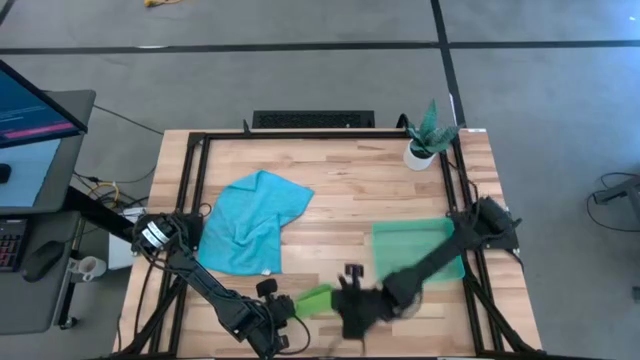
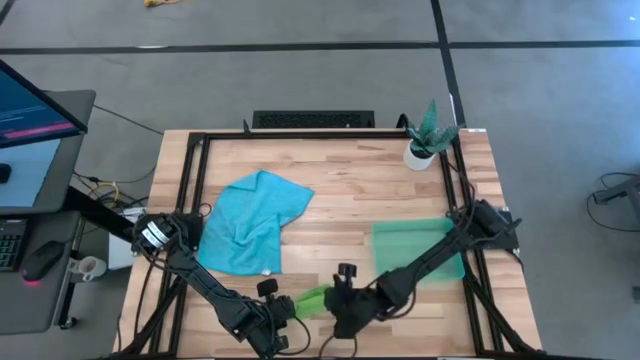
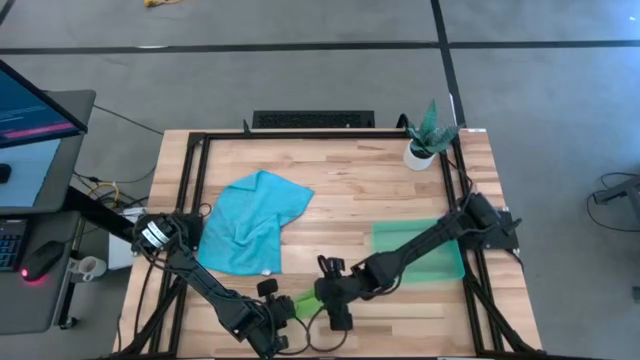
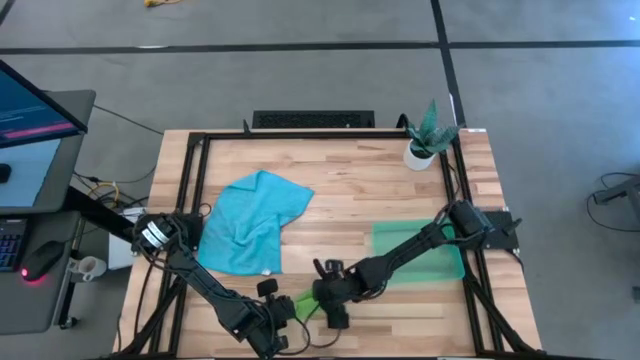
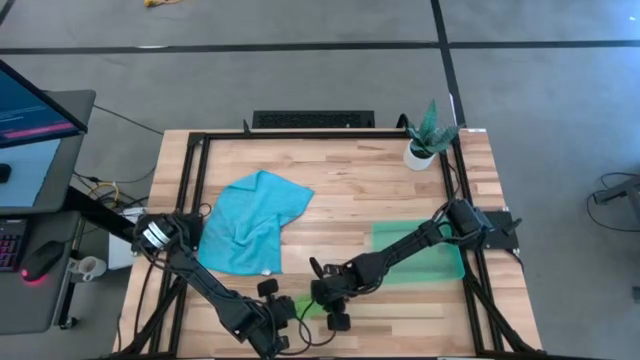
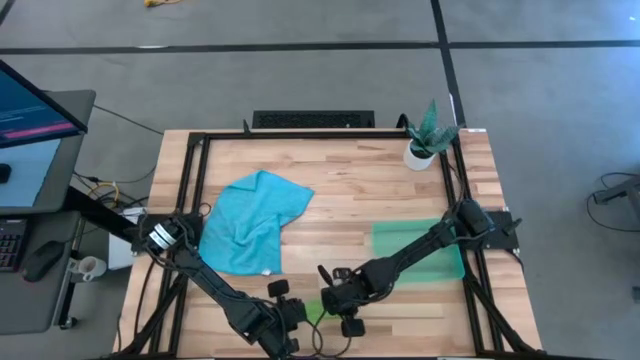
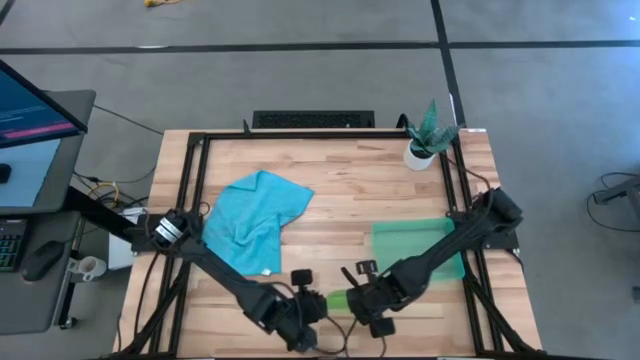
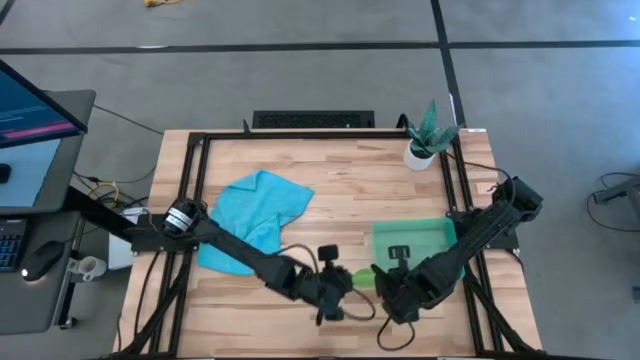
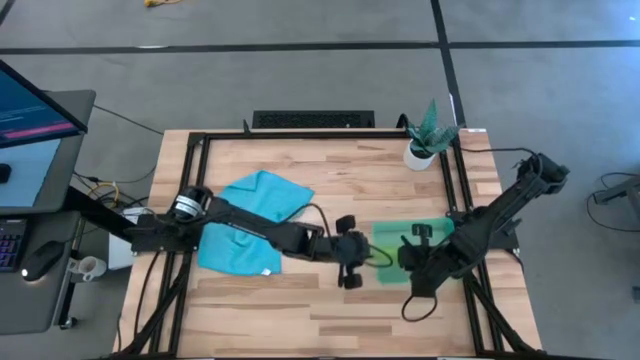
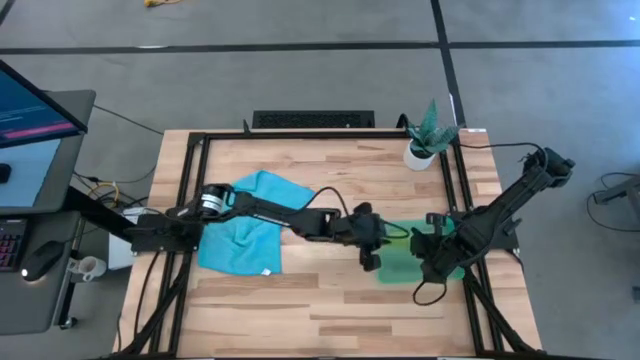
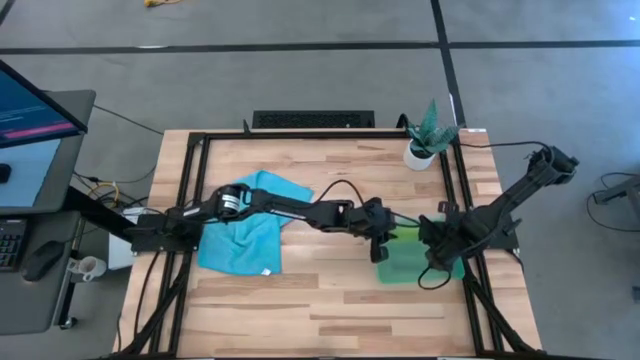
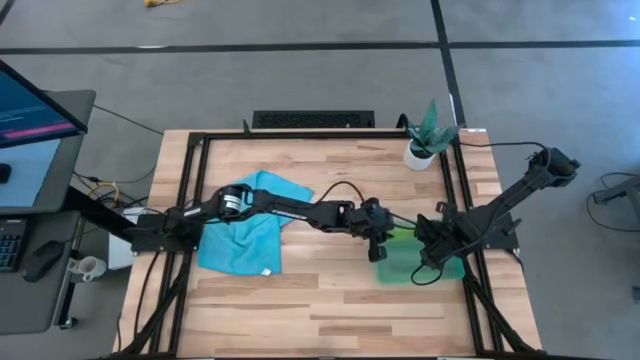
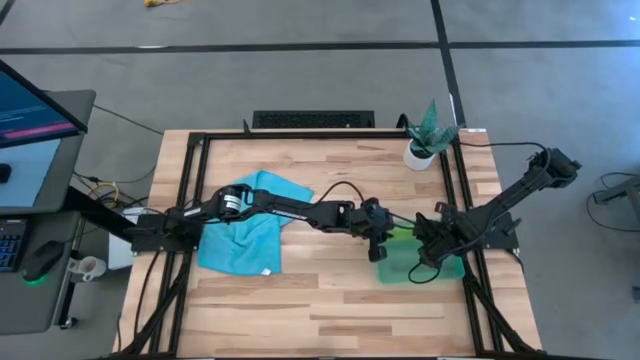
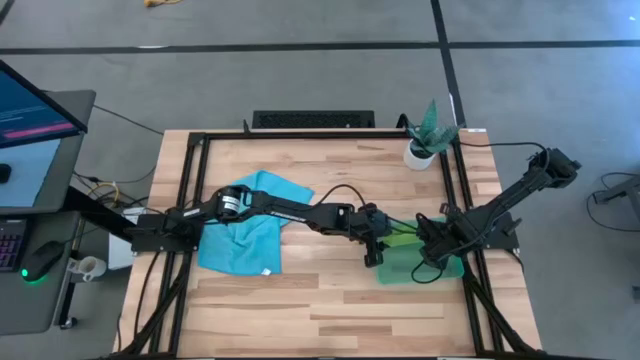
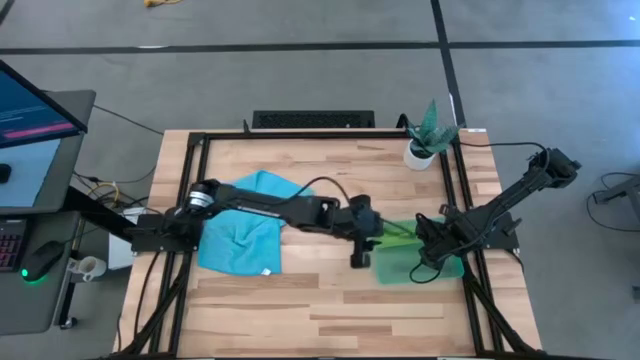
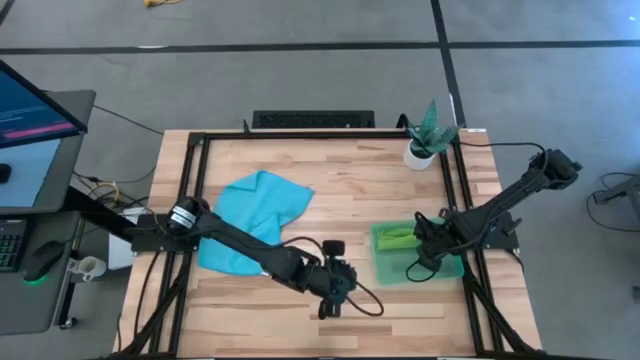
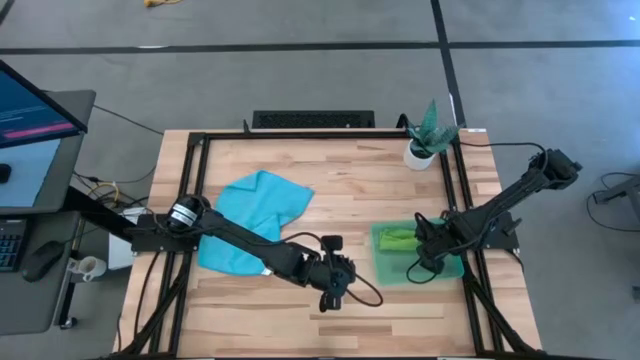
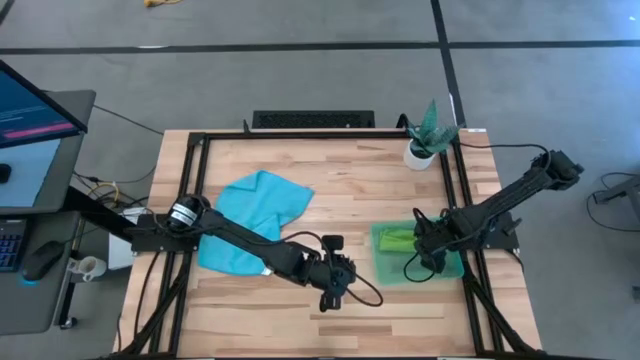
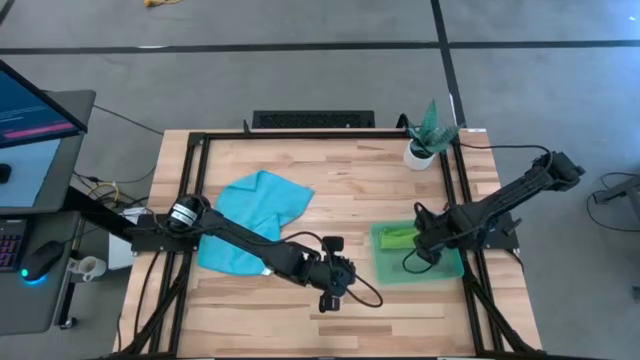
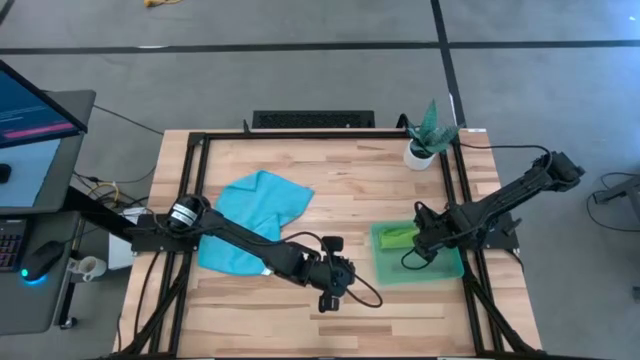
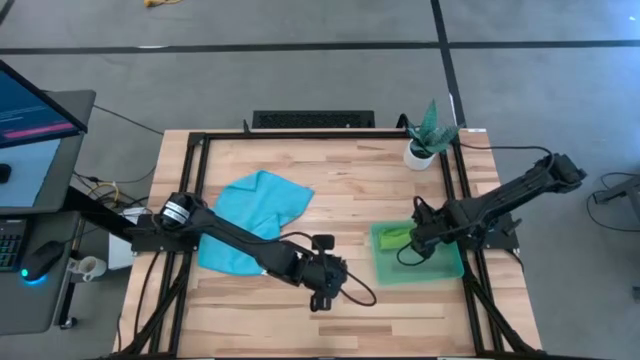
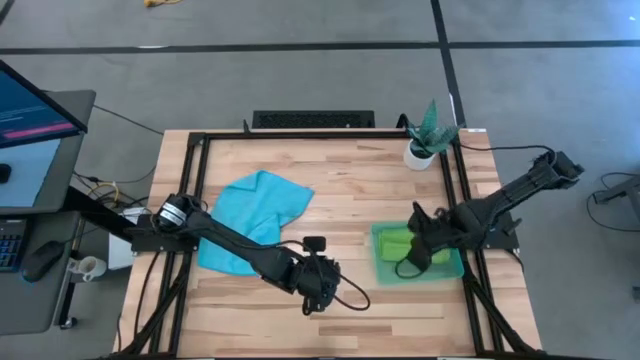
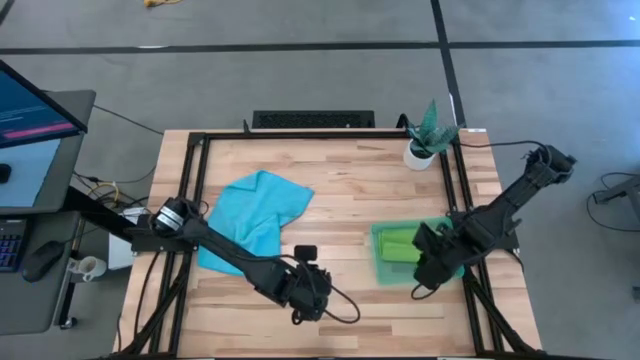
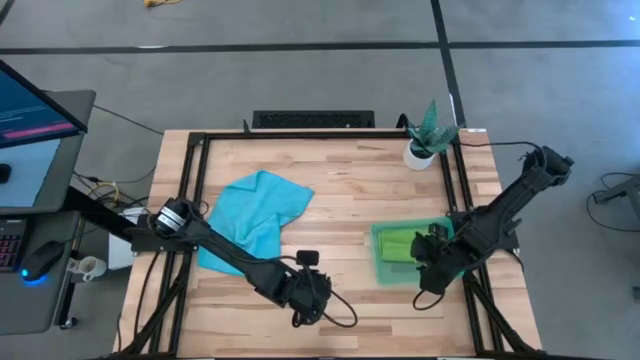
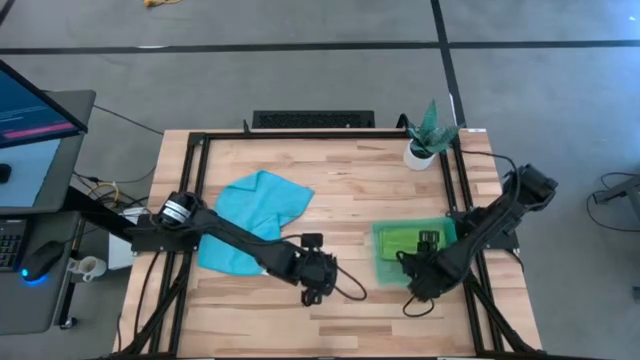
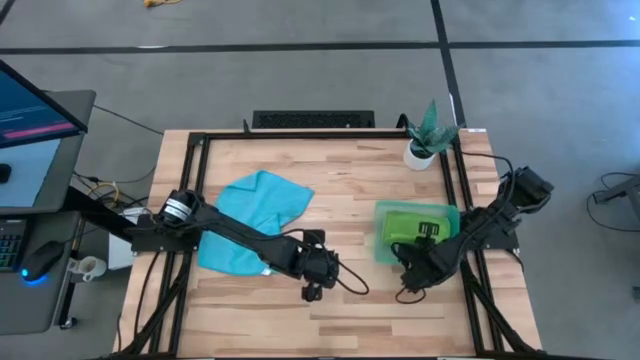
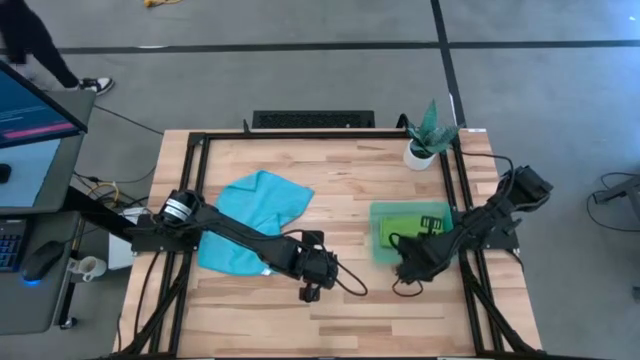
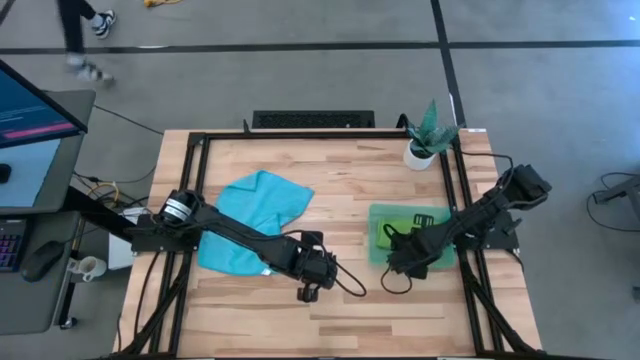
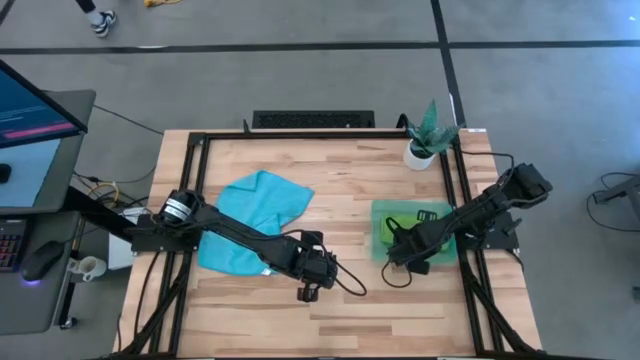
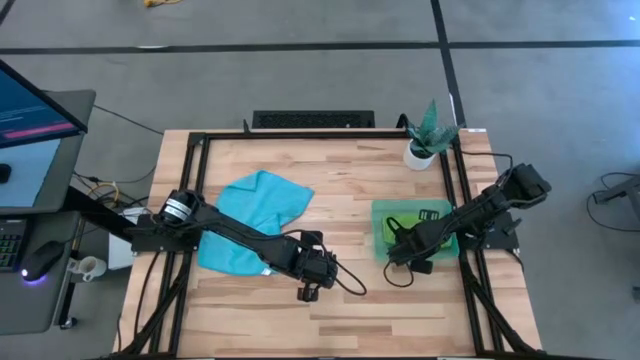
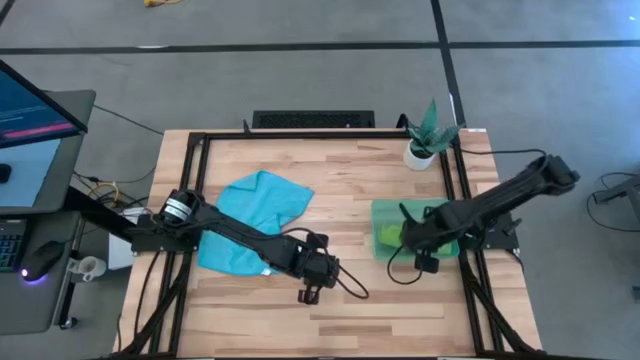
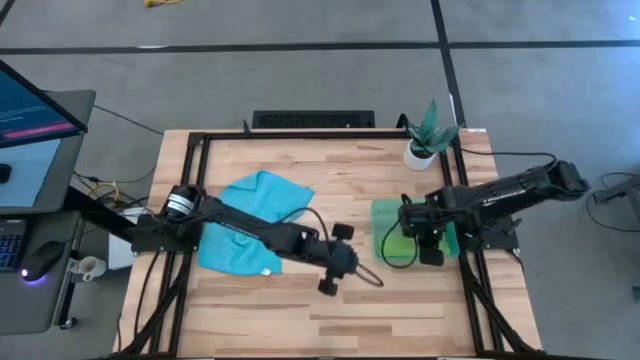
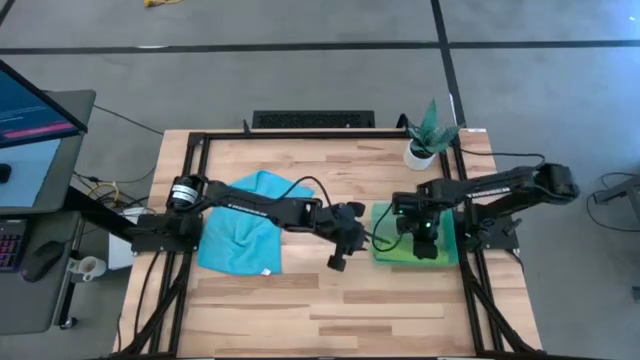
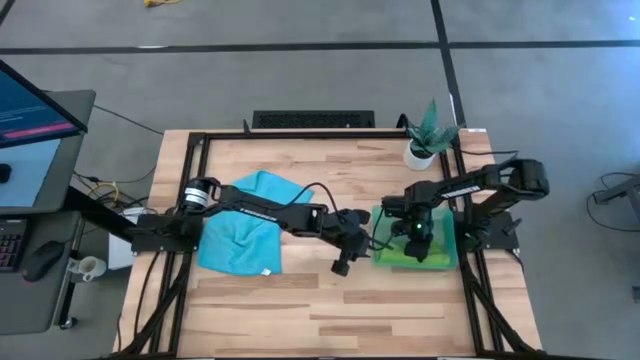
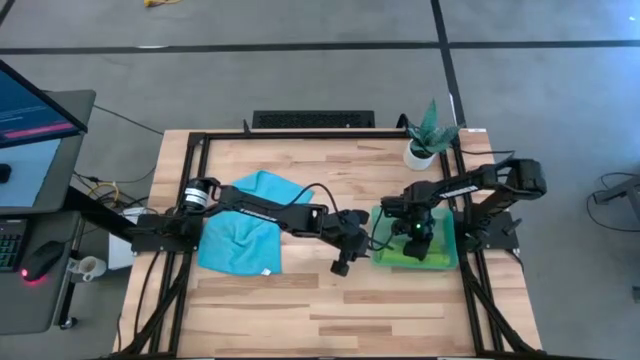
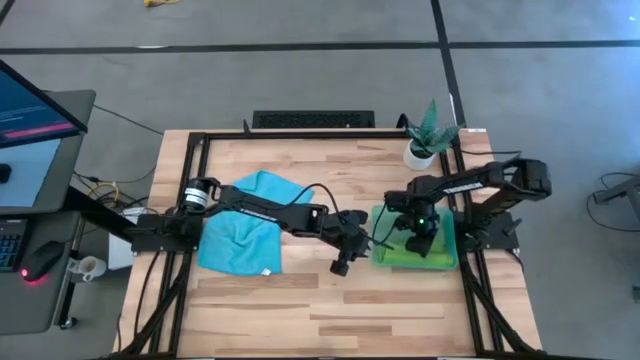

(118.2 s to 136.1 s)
Task: Roll microfiber towels into tight, uniform cylinder then place into a basket
Put the green towel into the green bin

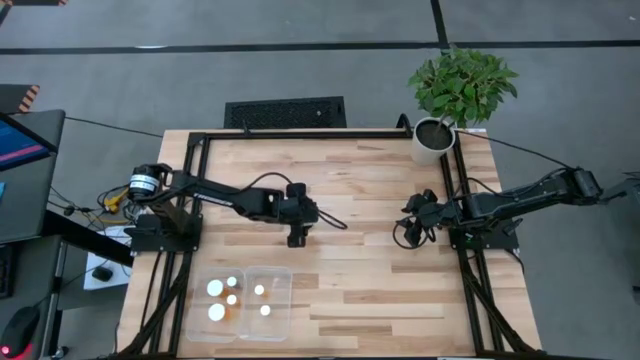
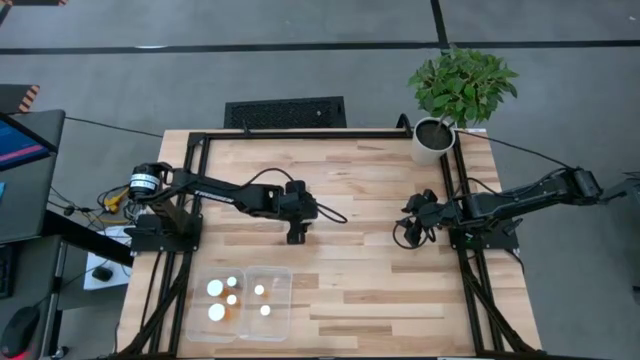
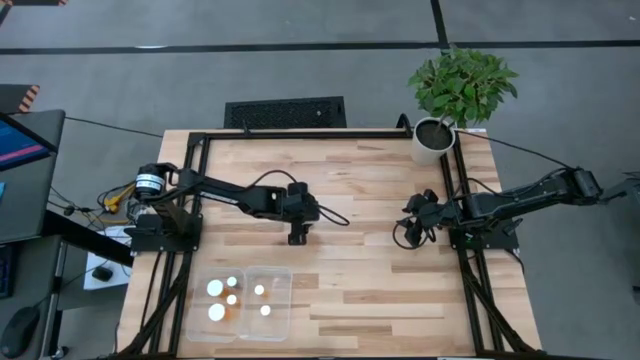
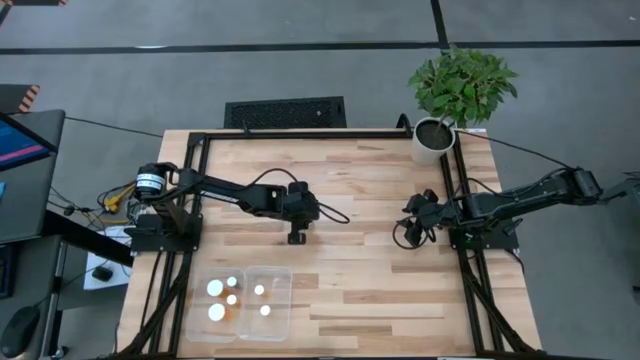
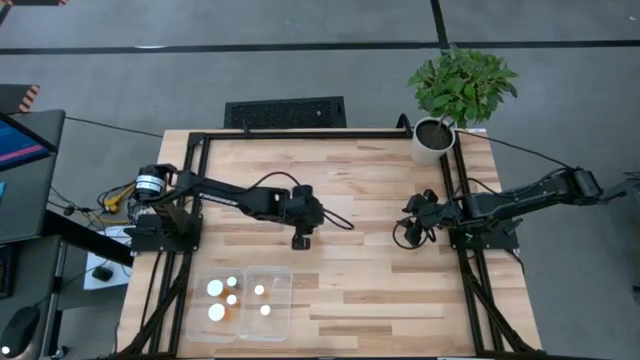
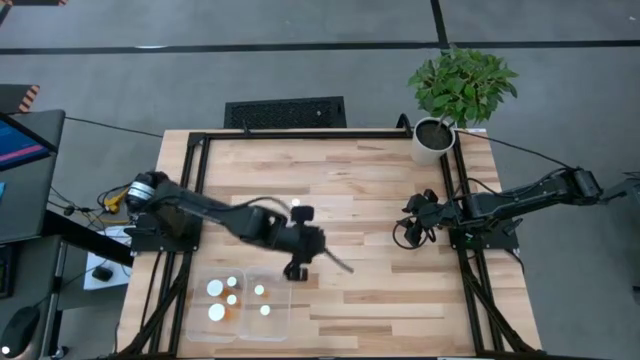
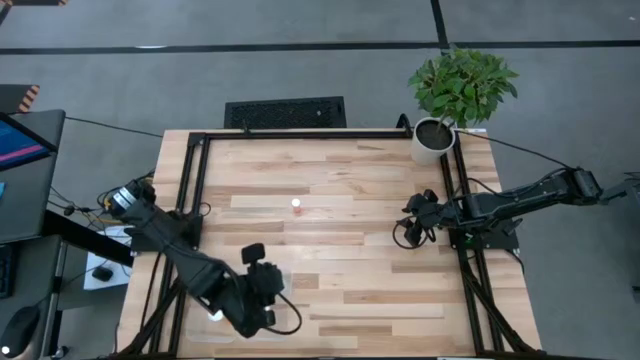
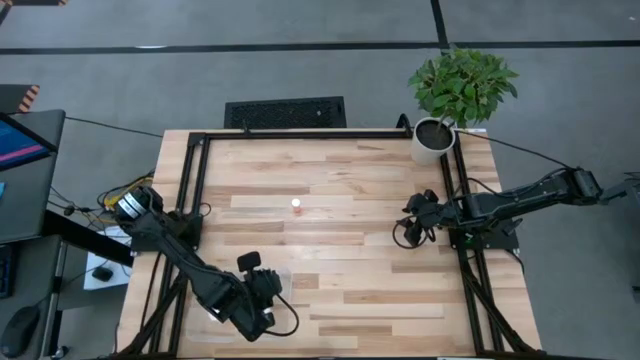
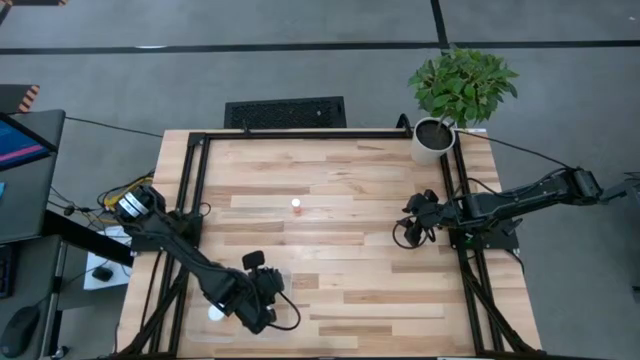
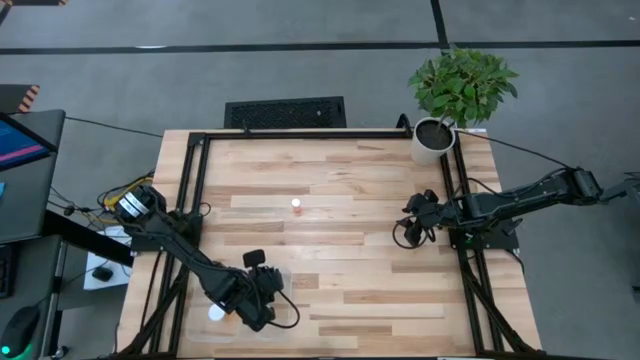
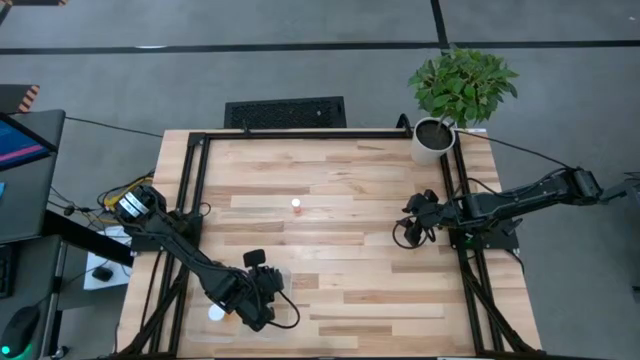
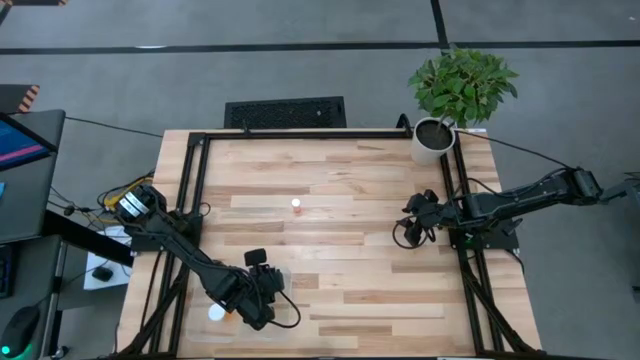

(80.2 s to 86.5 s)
Task: Pick and place medicine bottles into bin by pill shape (circle, oval)
Put the blue pill bottle into the right transparent bin
